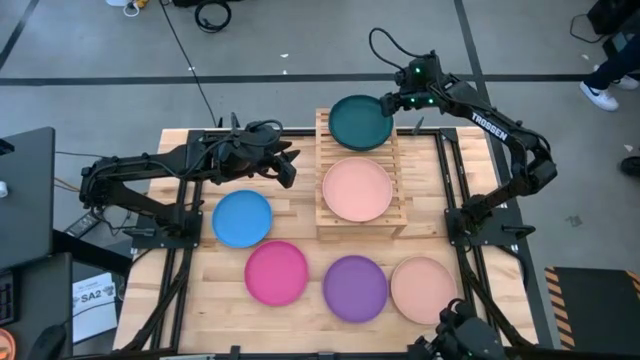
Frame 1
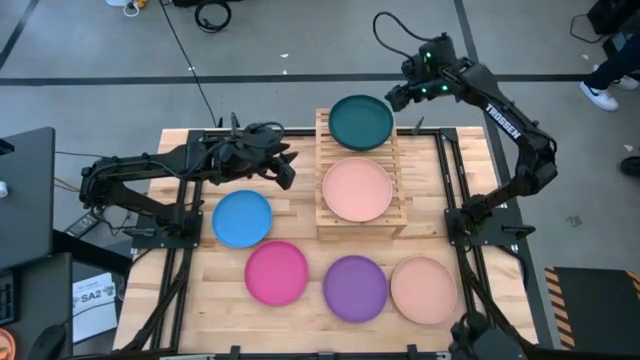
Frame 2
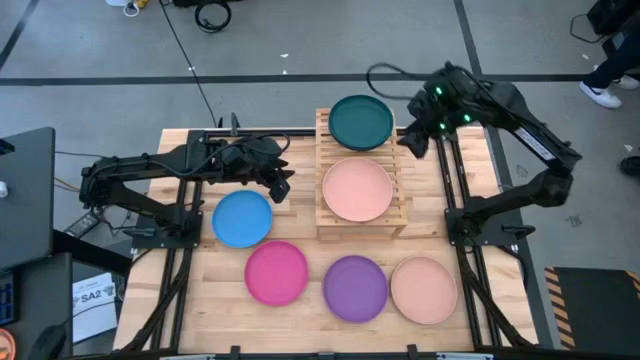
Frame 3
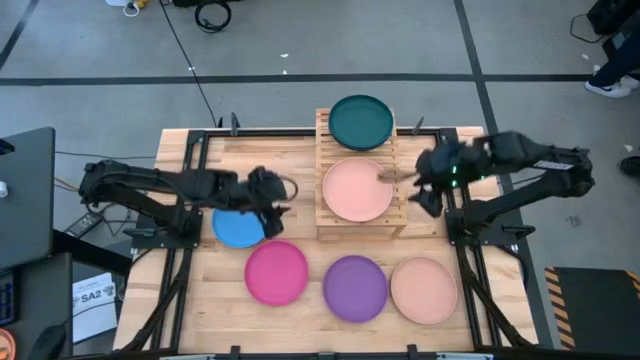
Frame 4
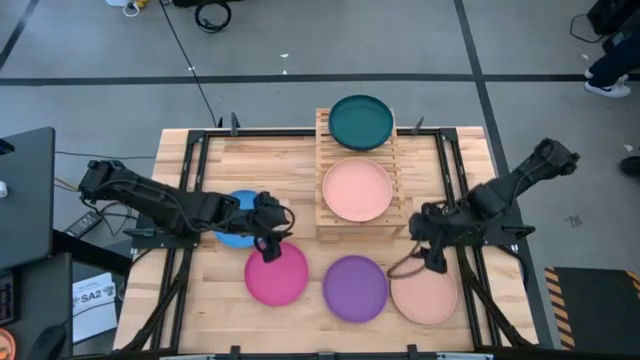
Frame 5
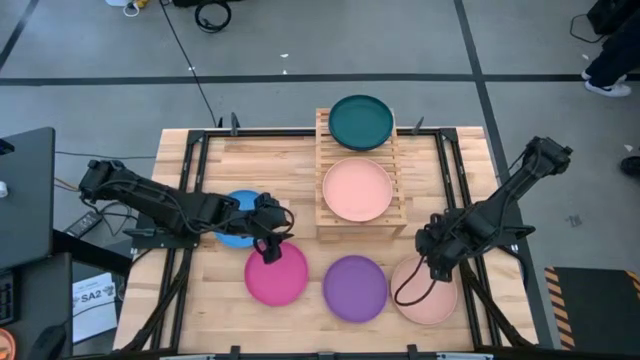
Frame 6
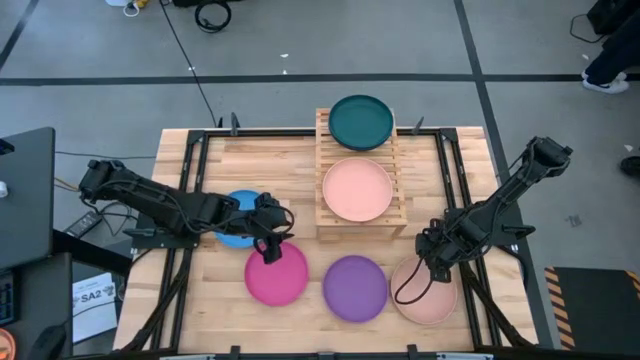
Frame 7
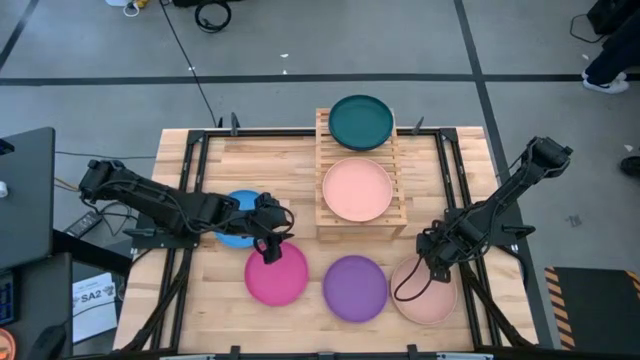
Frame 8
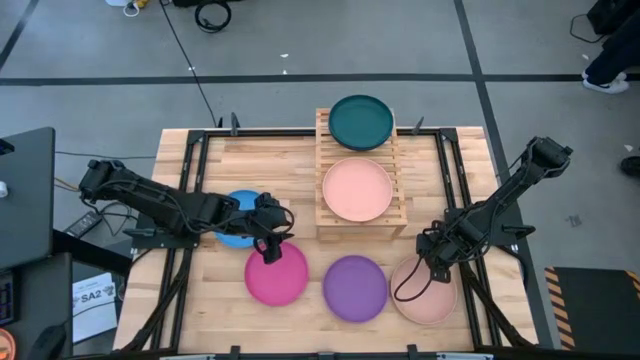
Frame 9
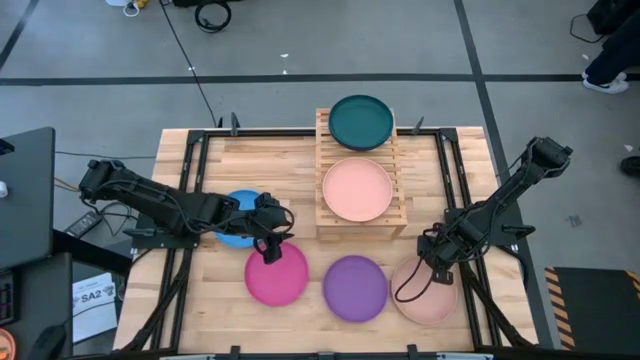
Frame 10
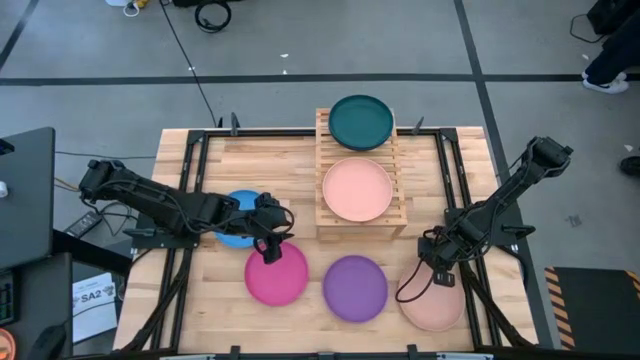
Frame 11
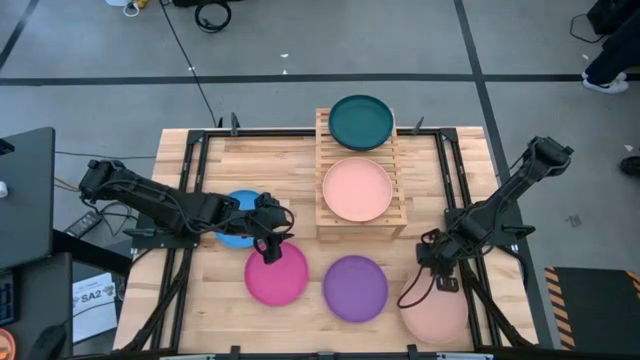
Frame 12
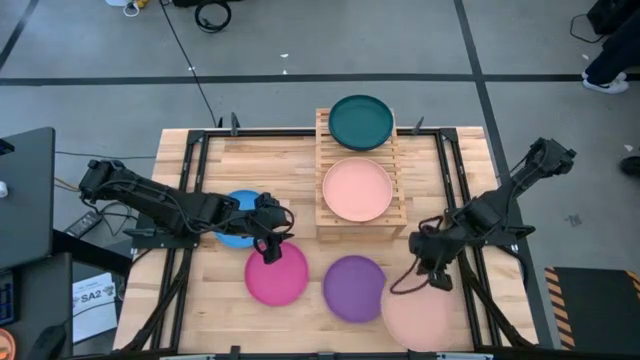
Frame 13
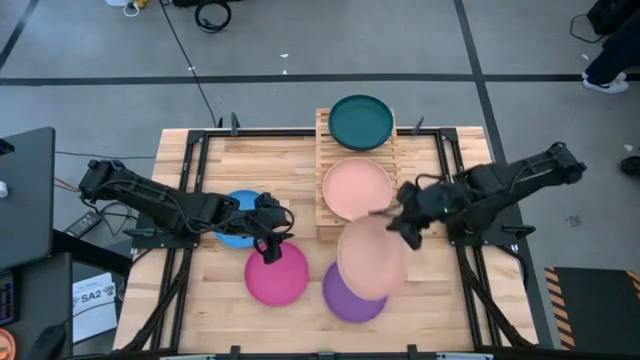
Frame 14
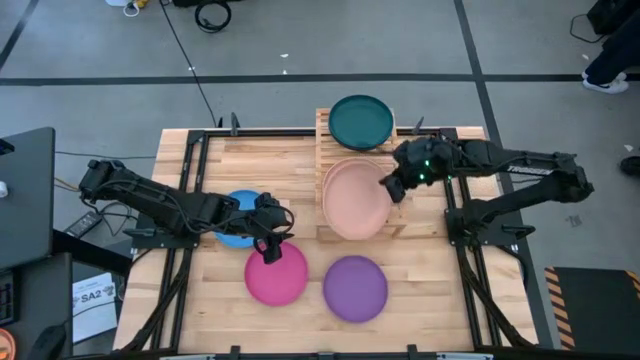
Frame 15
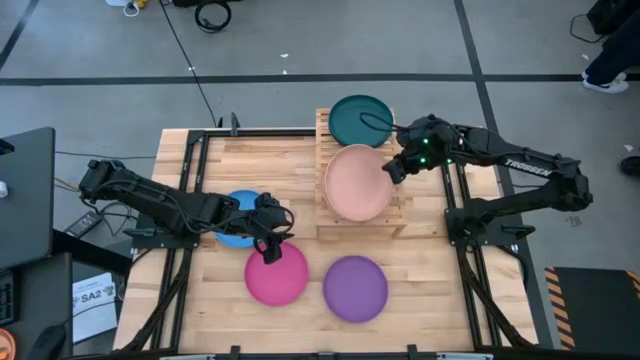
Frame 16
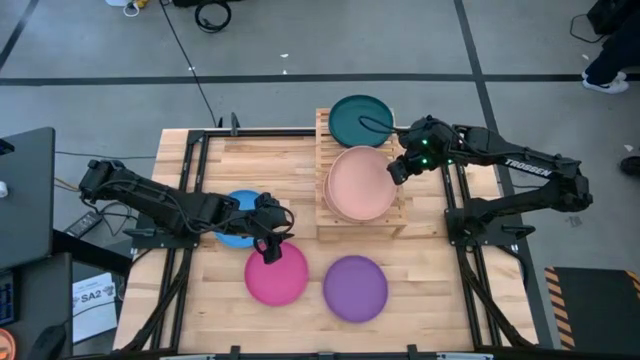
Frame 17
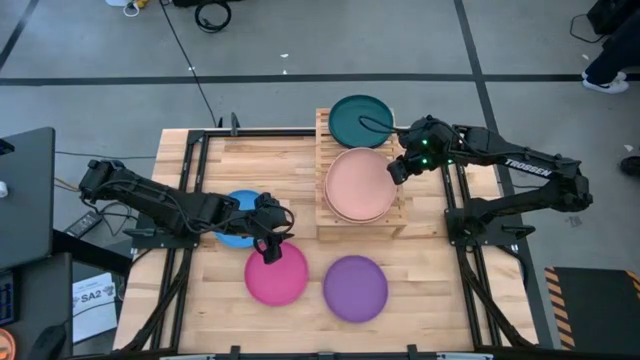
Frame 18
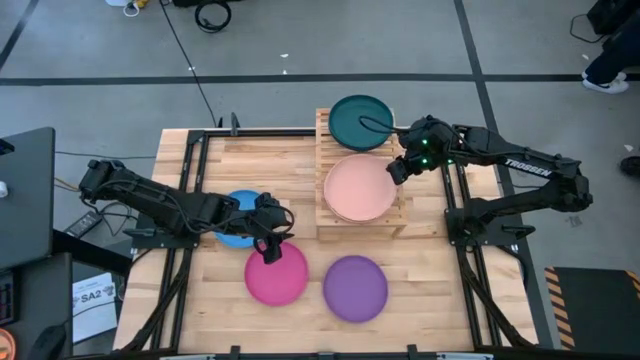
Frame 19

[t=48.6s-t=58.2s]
Task: Place and stack plates onto a shelf
Stack the light pink plate on top of the light pink plate

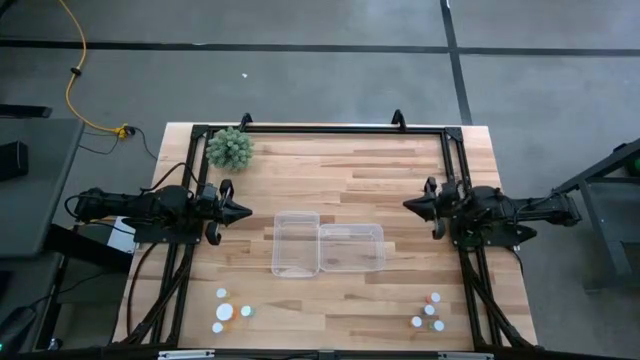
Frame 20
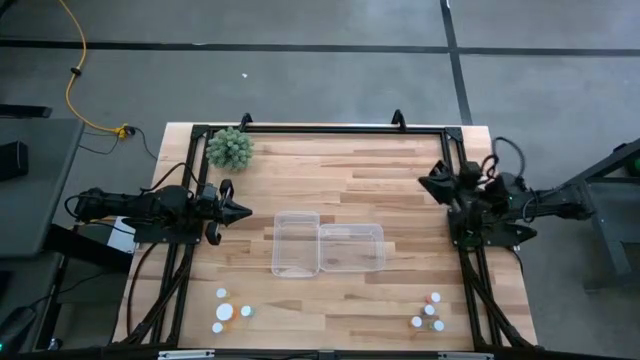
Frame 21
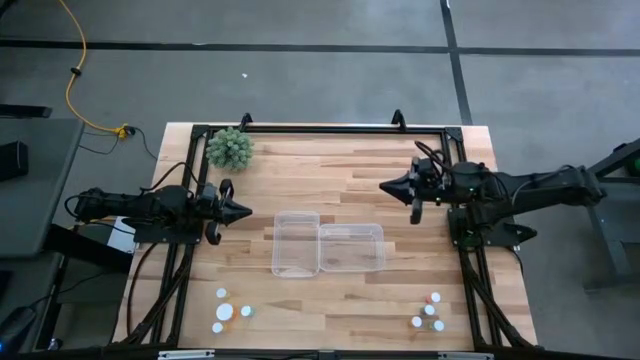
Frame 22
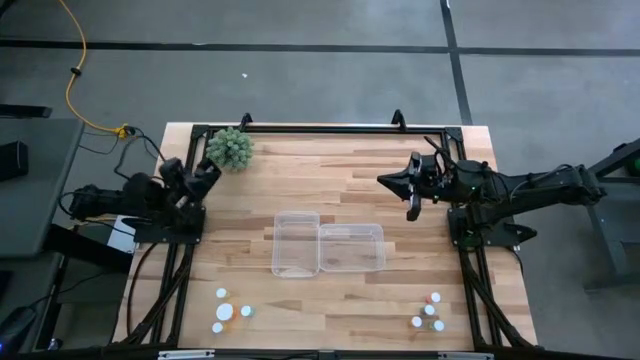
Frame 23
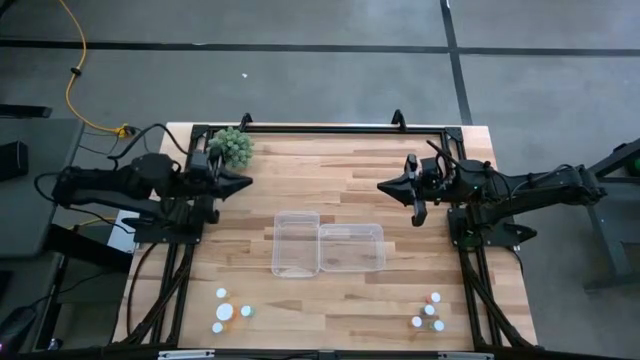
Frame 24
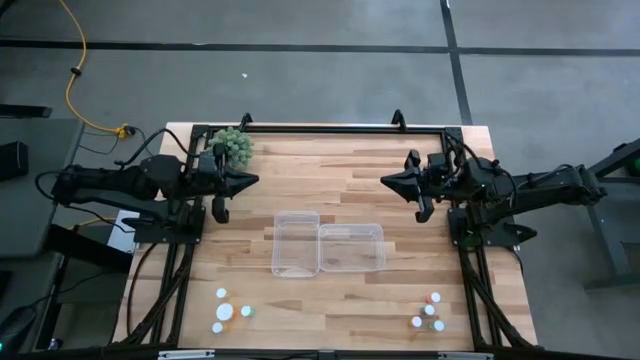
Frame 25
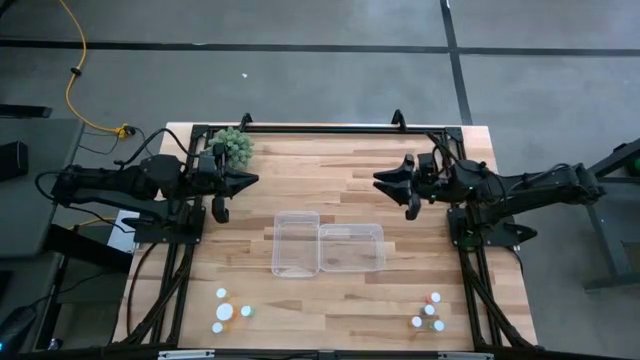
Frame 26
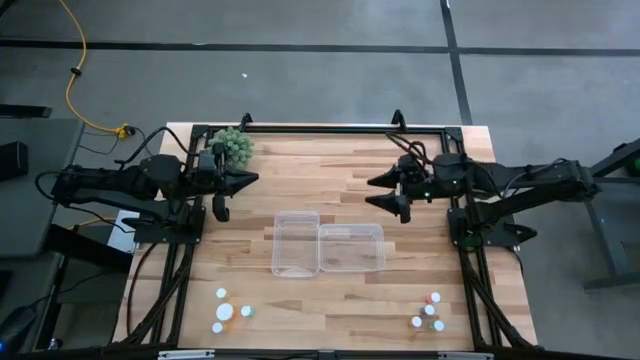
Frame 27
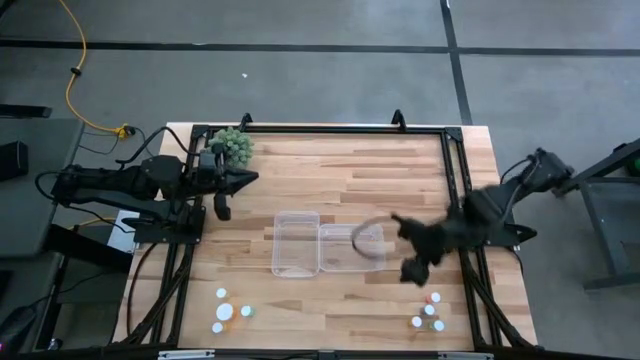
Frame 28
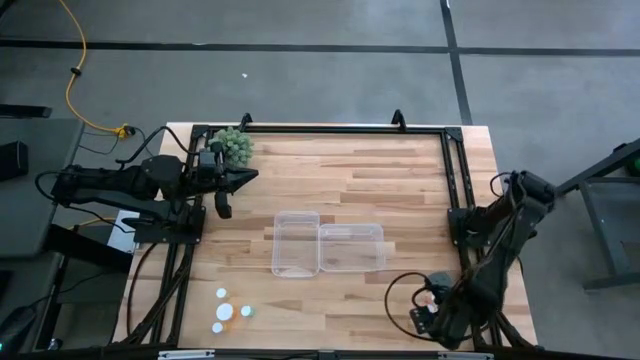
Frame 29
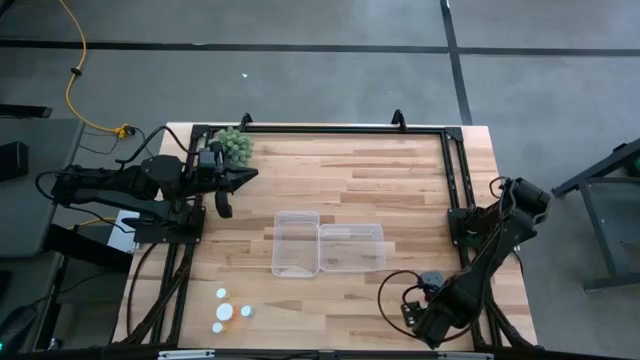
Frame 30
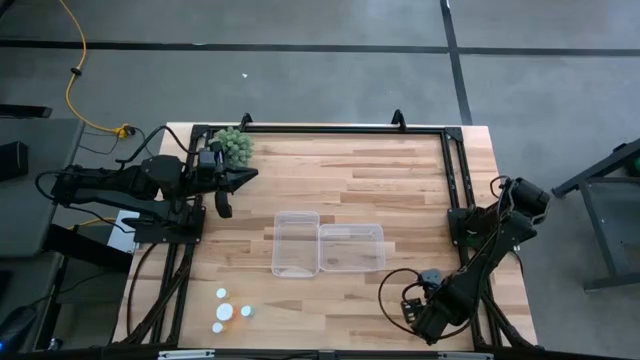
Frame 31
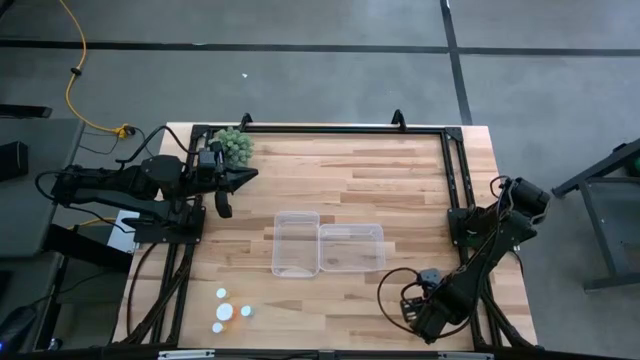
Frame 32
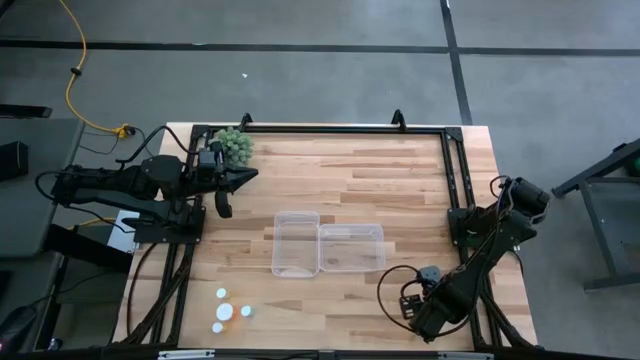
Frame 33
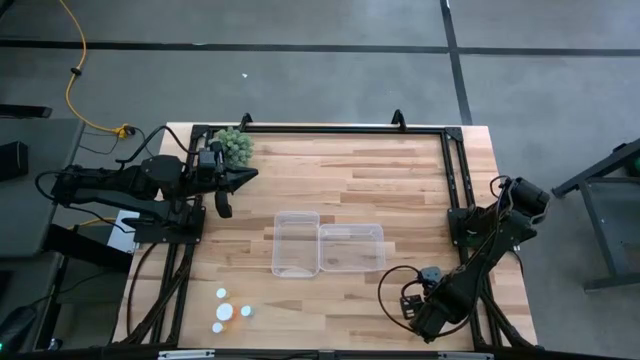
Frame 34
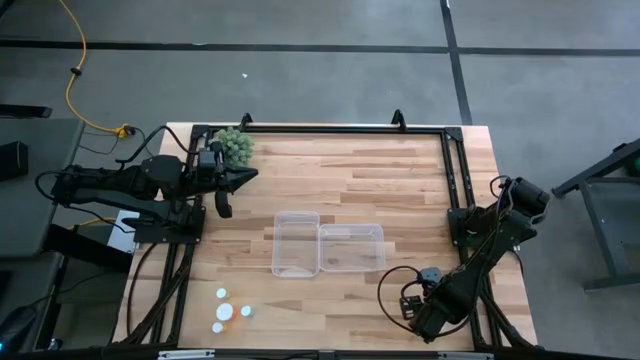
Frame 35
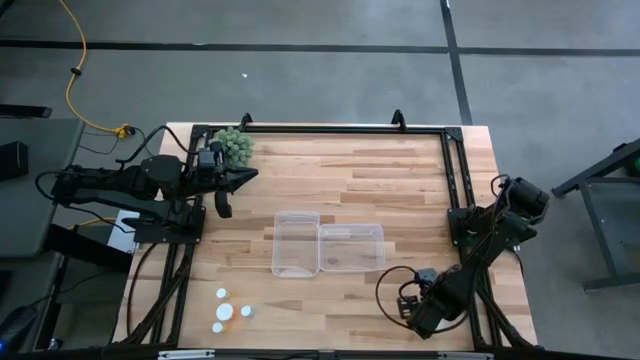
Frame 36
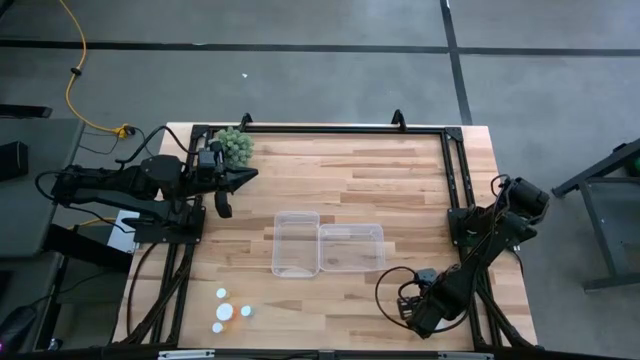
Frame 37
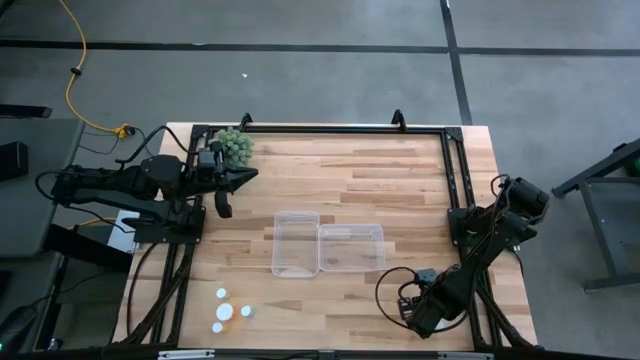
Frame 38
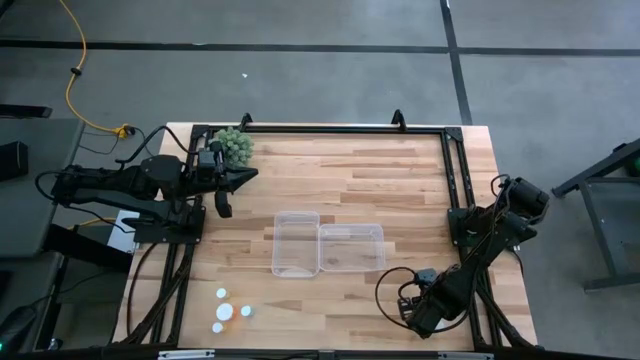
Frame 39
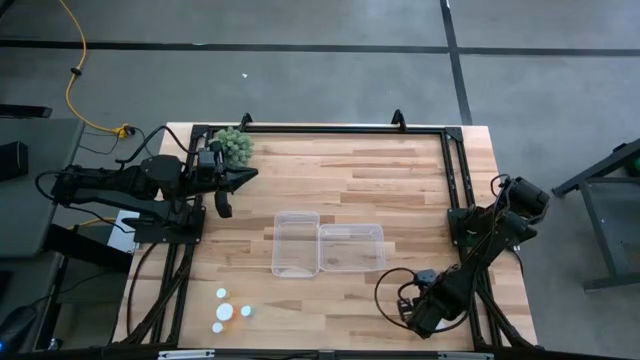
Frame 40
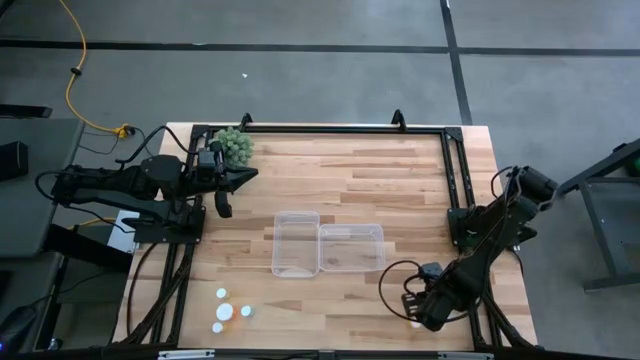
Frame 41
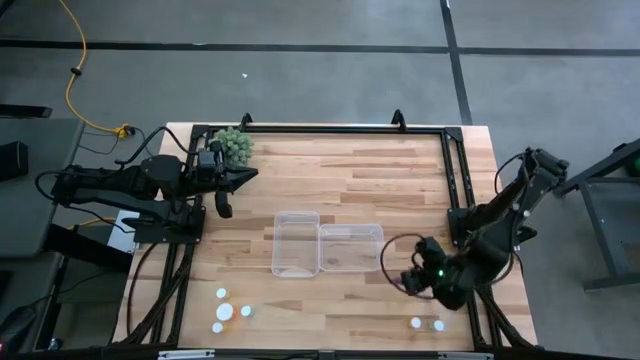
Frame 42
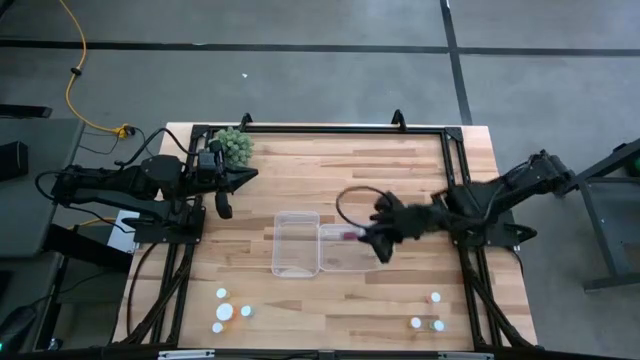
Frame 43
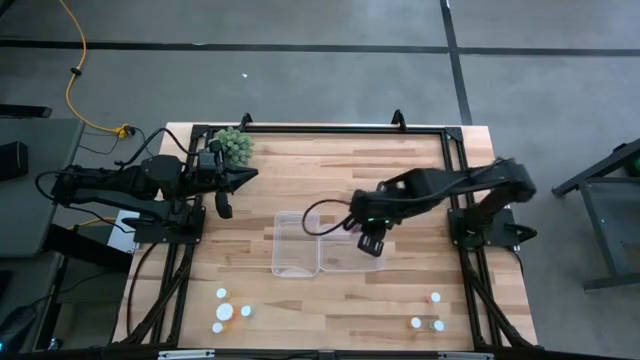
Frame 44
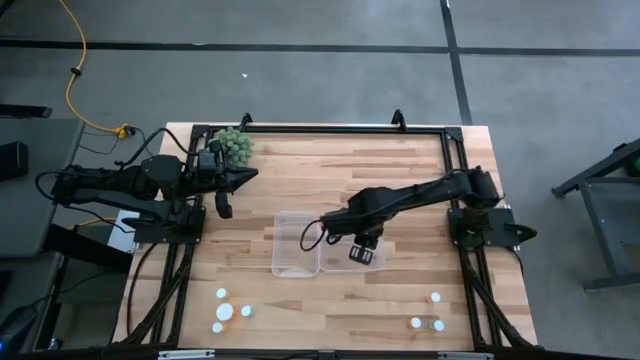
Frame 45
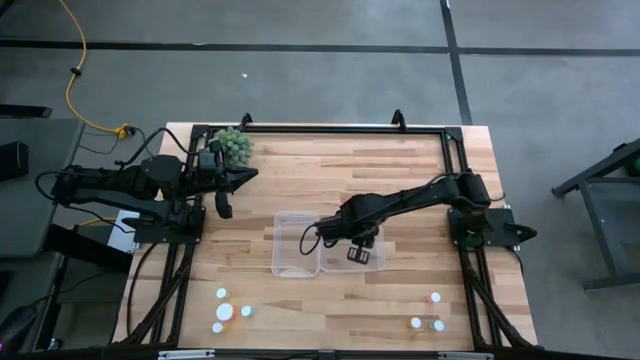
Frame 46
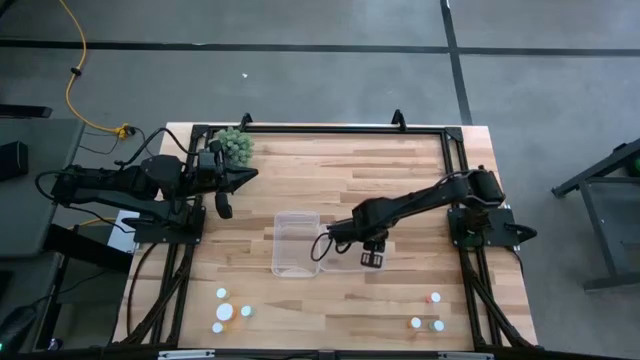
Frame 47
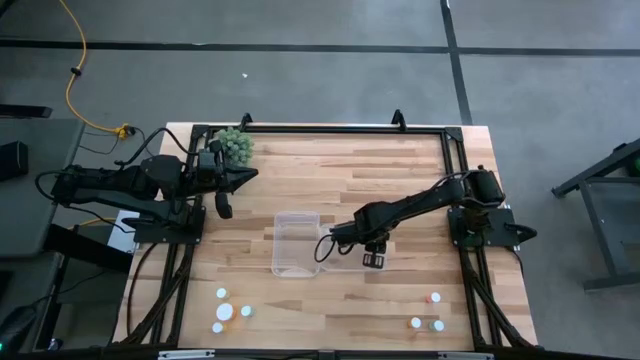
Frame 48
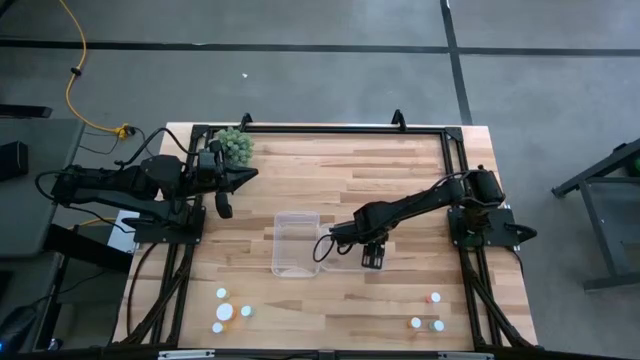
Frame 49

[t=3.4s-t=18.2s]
Task: Pick and place medicine bottles into bin by pill shape (circle, oval)
Put the top right blue pill bottle into the right transparent bin
